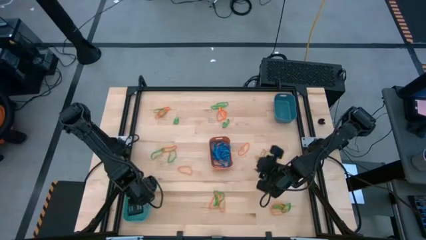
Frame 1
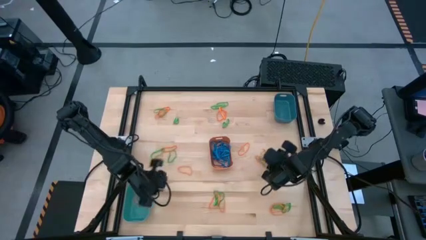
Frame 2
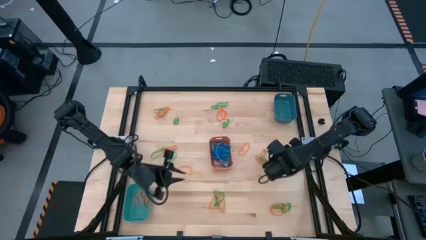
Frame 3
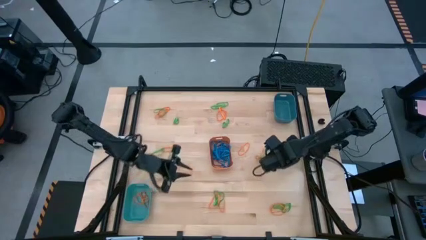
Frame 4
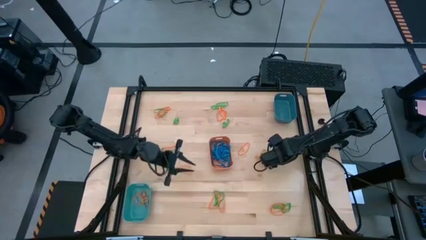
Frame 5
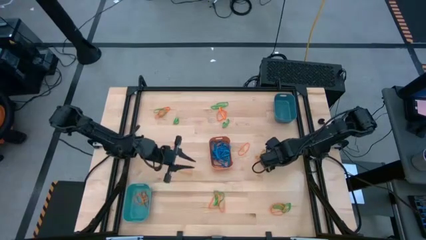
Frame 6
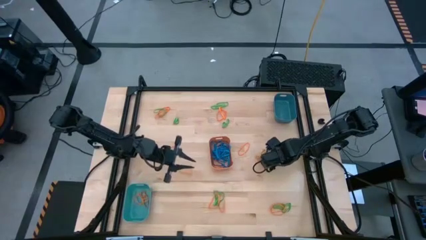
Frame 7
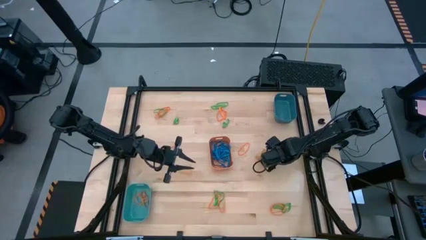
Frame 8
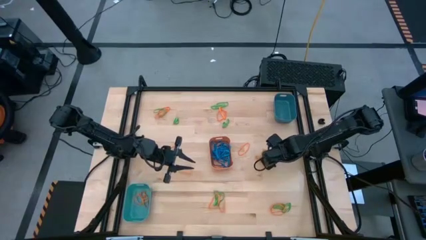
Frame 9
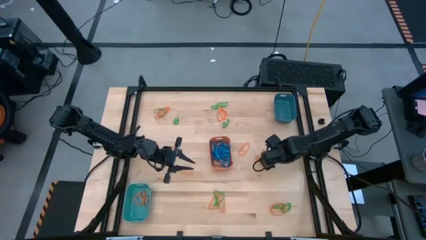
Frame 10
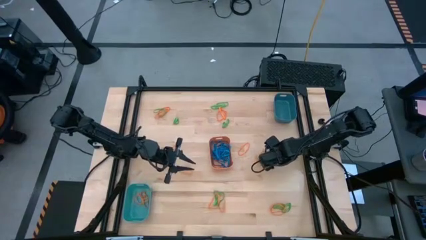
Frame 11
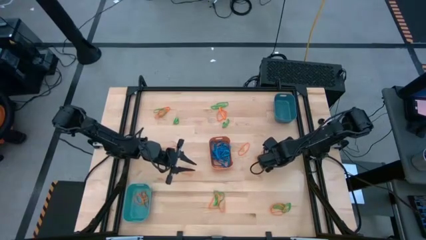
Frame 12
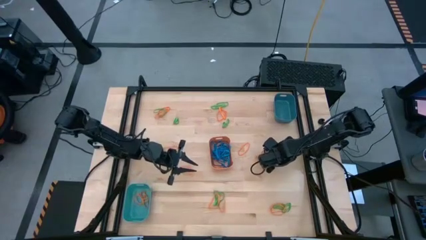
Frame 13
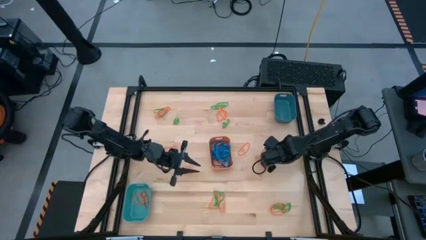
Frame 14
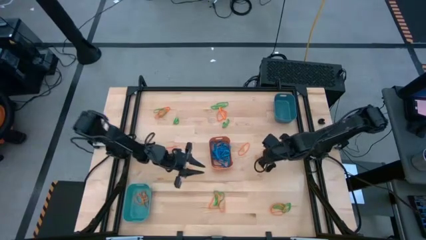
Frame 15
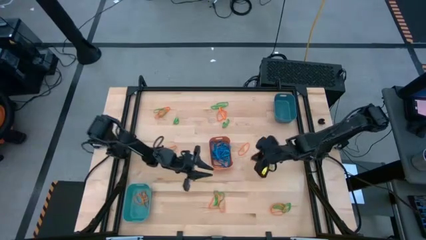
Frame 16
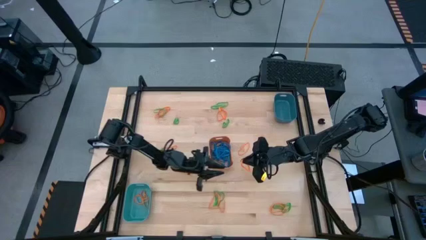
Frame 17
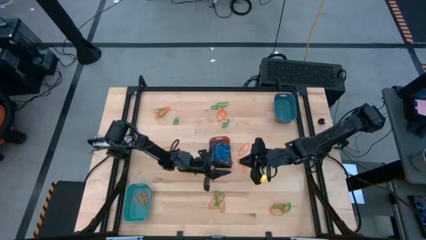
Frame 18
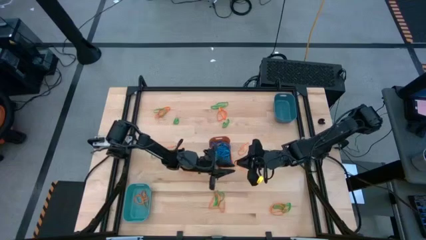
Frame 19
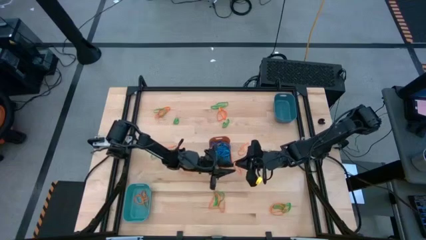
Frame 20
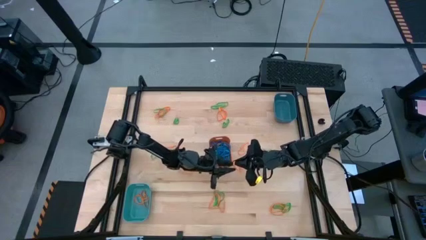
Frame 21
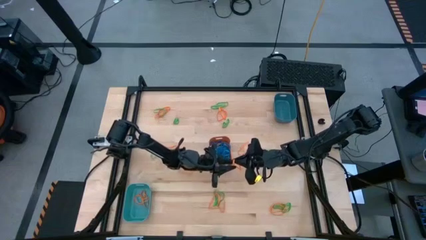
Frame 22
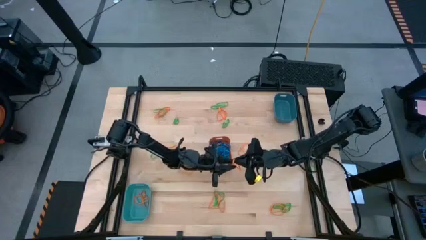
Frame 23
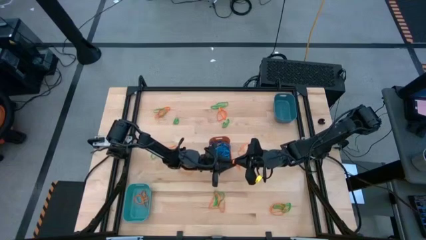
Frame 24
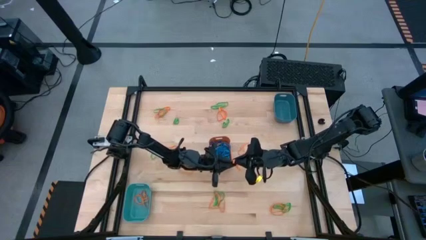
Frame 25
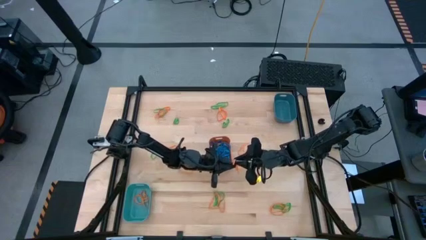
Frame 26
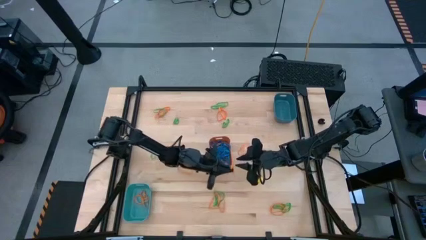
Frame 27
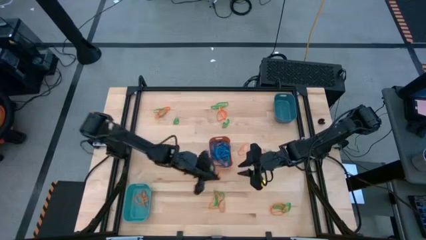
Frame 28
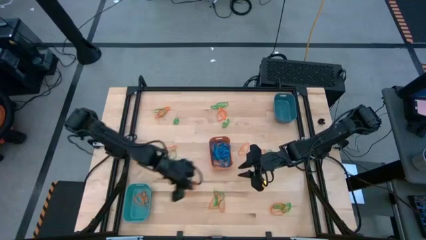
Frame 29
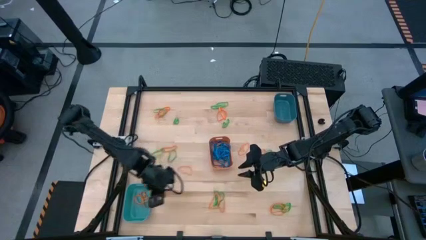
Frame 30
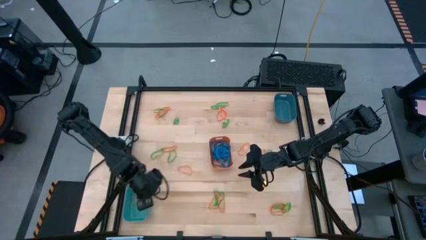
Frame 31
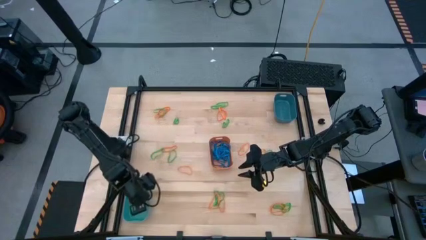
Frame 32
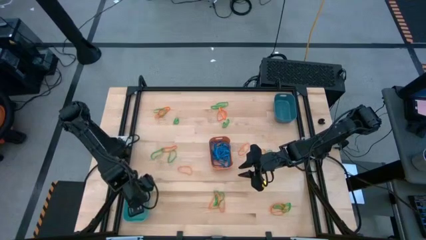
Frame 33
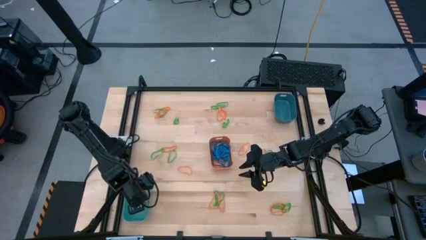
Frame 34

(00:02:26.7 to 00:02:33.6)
Task: Sort rubber bands into baskets
Put the orange rubber band into the green bin

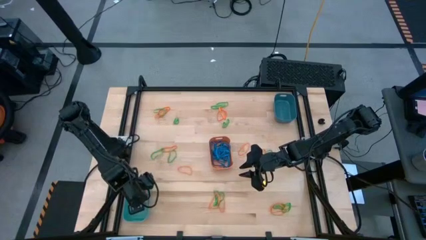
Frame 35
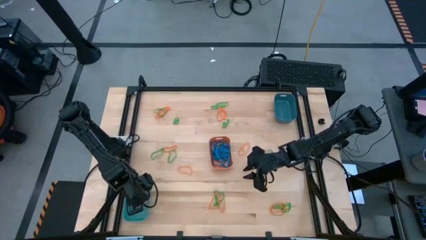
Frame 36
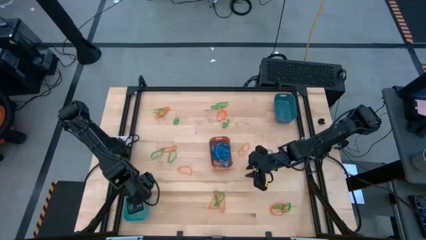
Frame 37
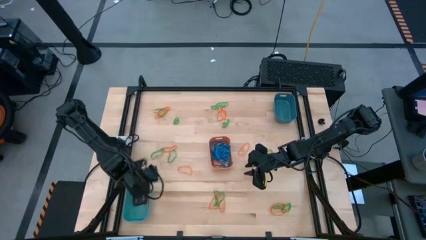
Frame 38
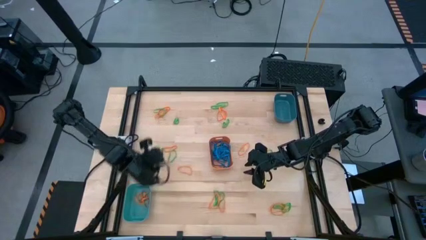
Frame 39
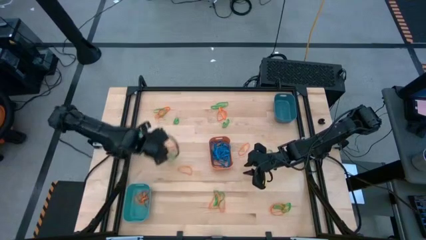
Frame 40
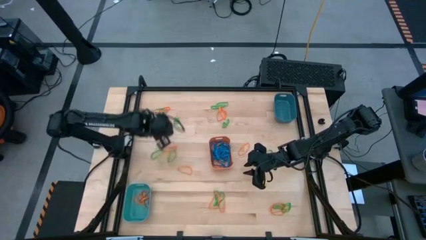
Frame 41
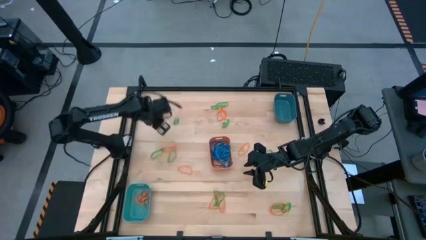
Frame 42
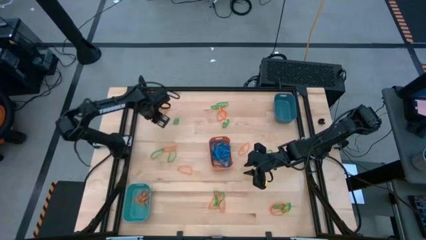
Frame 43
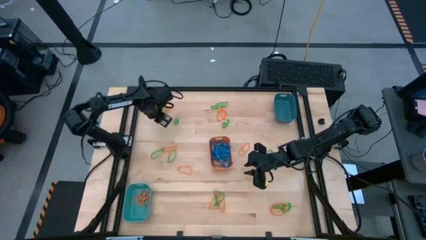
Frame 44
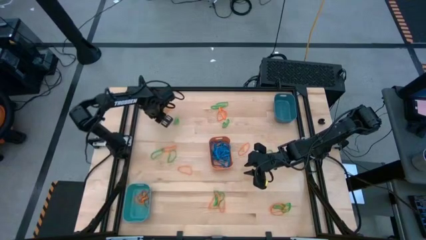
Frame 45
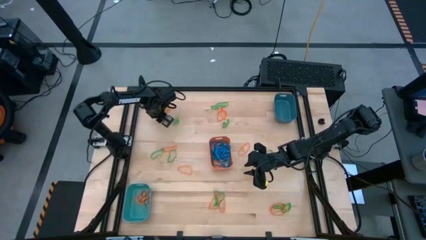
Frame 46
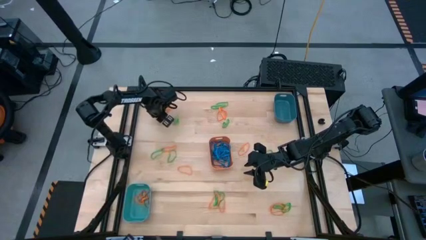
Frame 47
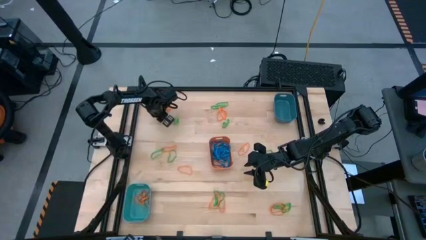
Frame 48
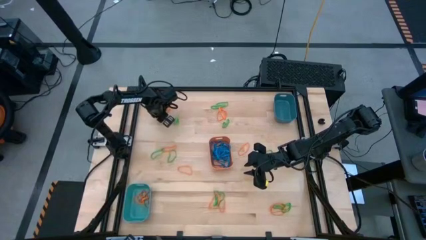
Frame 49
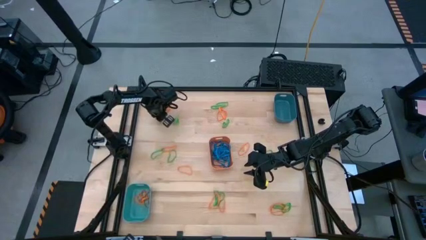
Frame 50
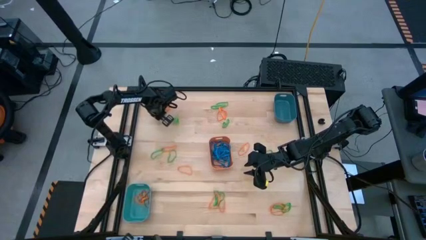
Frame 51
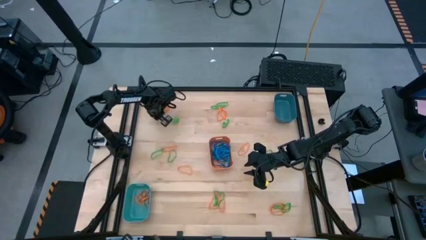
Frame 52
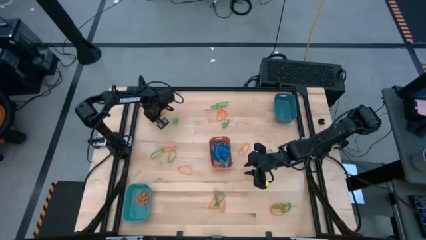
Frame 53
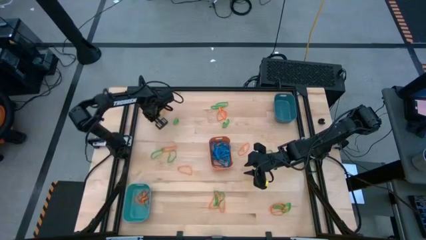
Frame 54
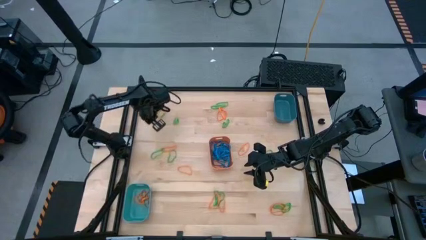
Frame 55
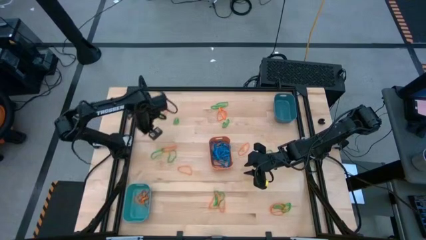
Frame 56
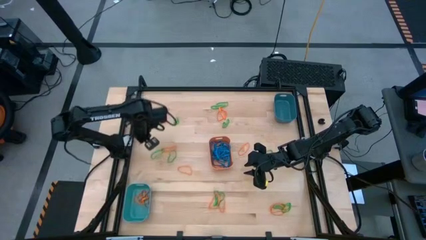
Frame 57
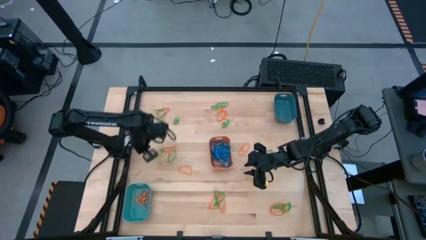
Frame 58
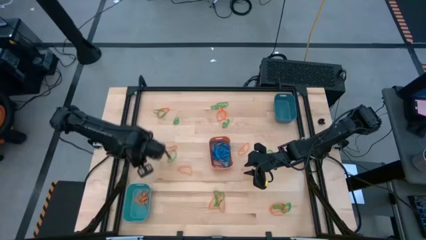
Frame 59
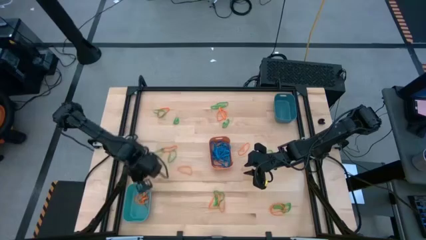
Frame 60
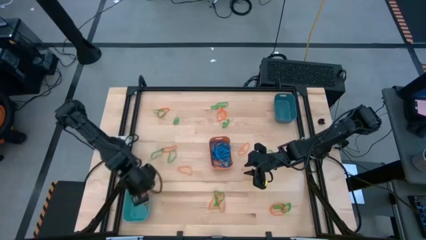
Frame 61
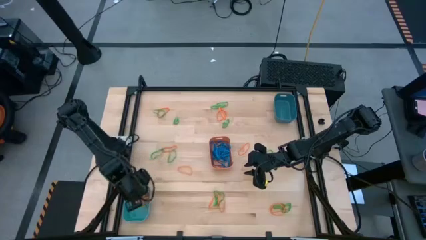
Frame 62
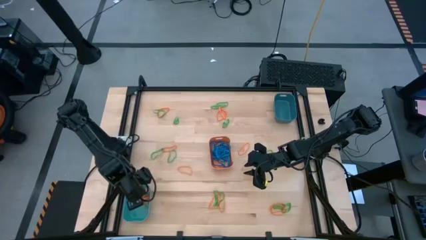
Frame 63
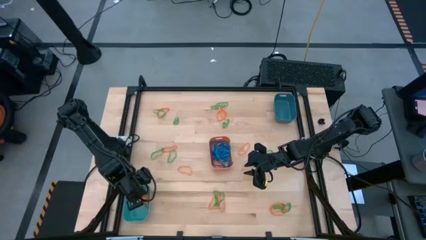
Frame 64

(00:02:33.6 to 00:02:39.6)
Put the orange rubber band into the green bin

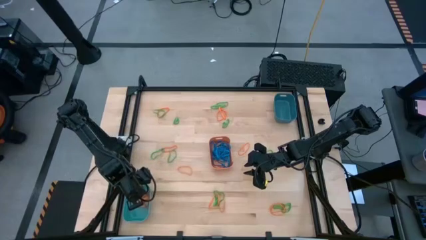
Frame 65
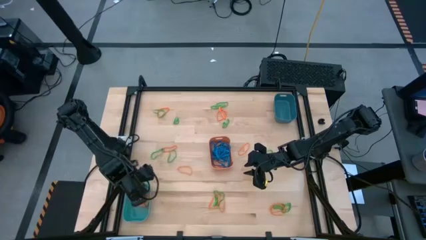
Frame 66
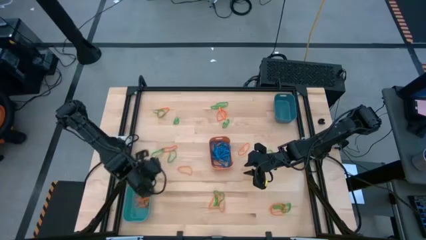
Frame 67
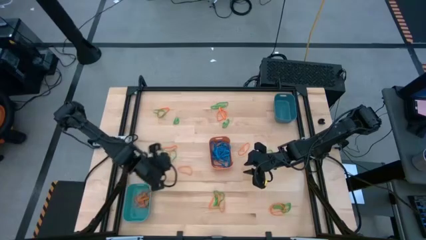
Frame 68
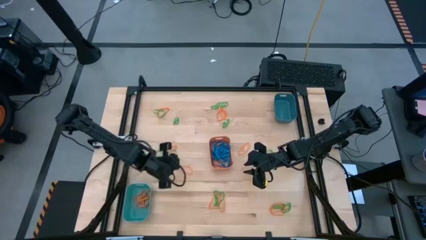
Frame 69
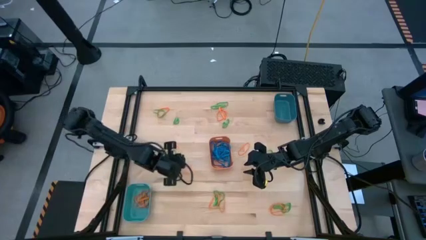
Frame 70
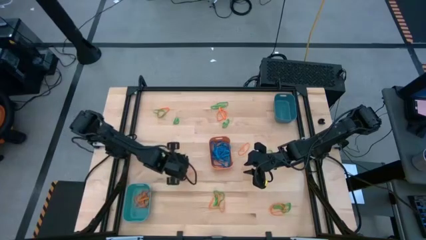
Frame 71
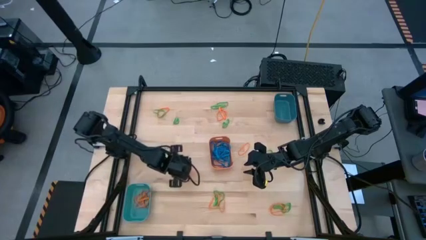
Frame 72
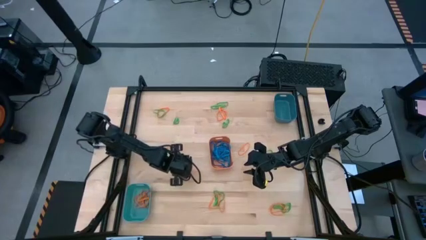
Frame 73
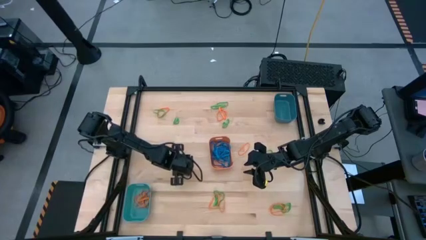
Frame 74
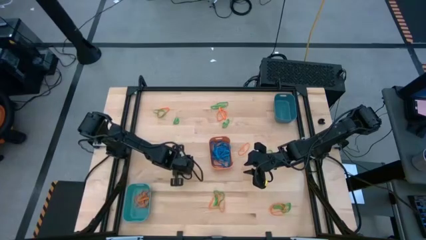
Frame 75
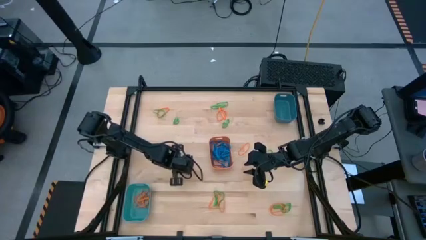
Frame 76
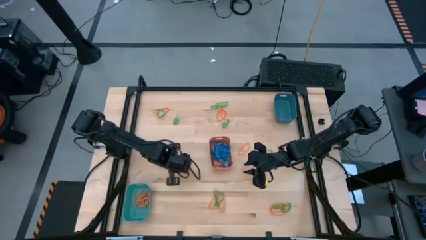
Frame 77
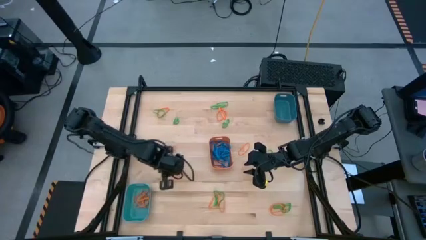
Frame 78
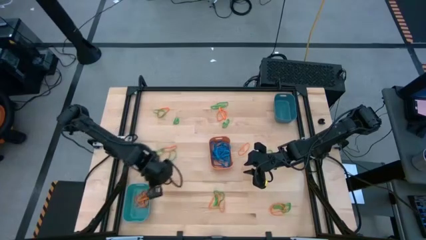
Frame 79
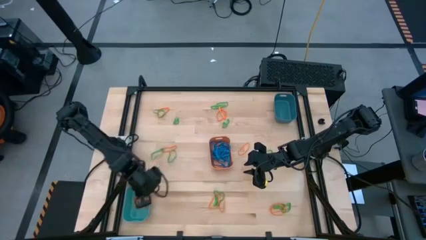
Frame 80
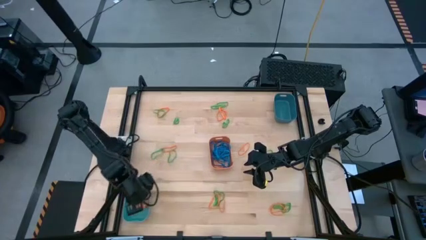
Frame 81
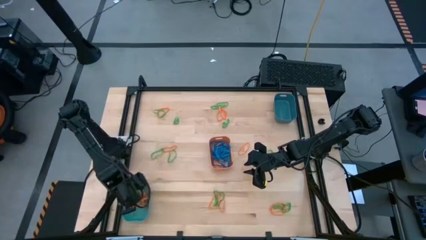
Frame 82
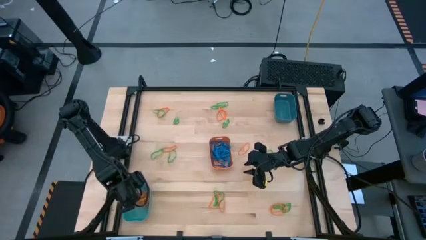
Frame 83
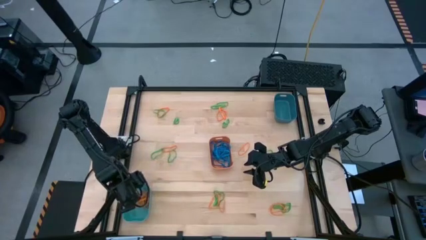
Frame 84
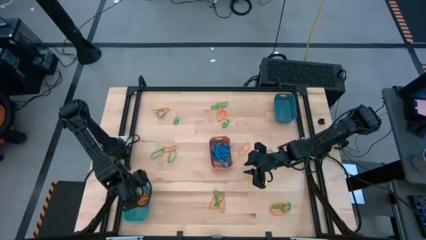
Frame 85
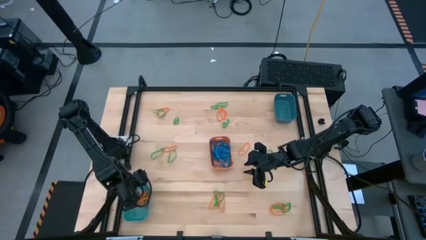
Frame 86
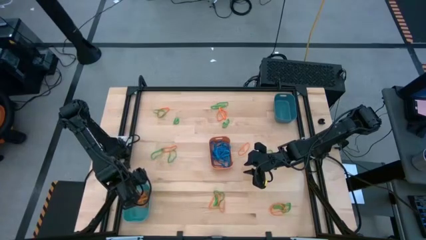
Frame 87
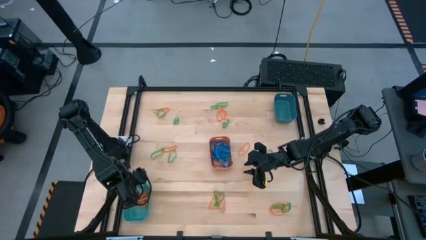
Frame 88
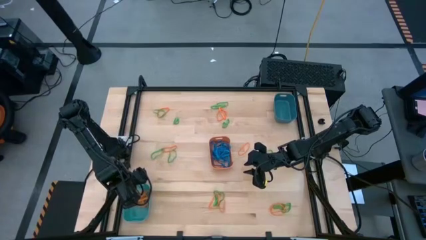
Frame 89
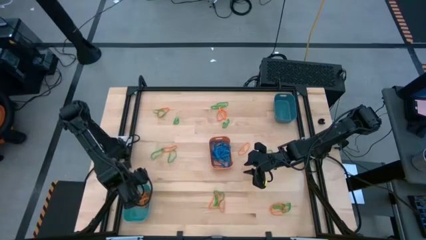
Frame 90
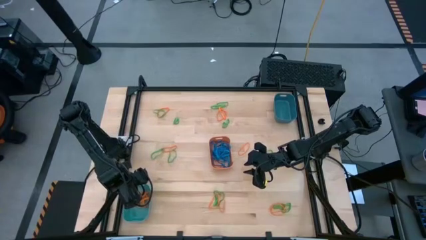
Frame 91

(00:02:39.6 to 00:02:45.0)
Put the orange rubber band into the green bin
